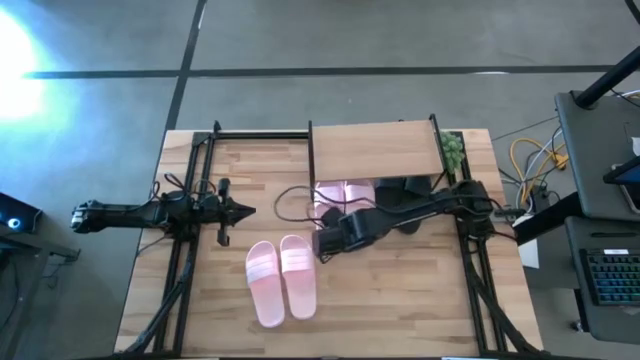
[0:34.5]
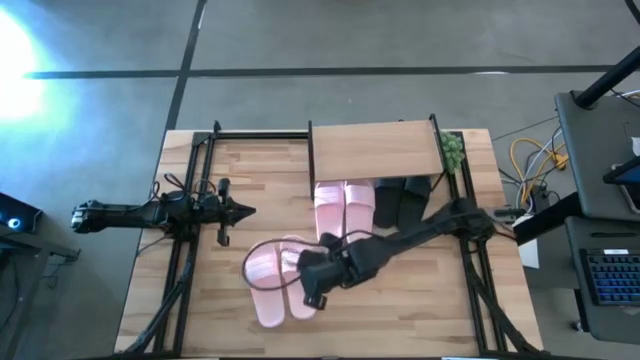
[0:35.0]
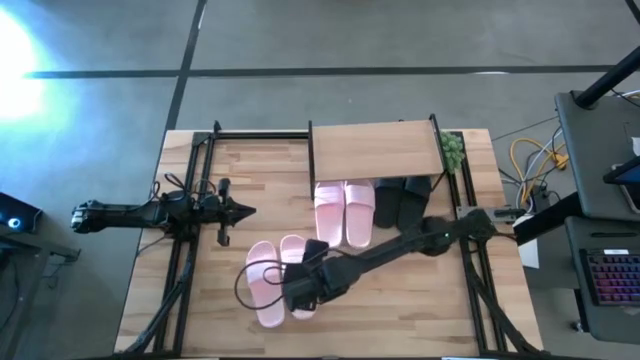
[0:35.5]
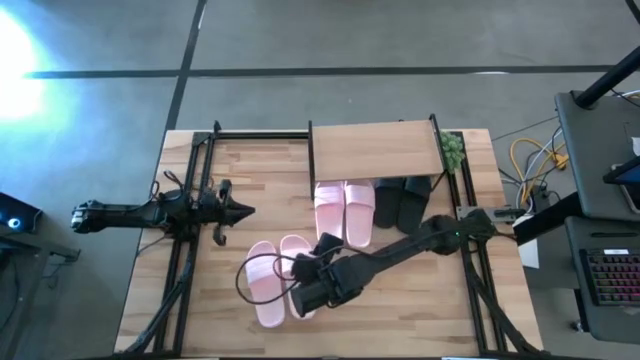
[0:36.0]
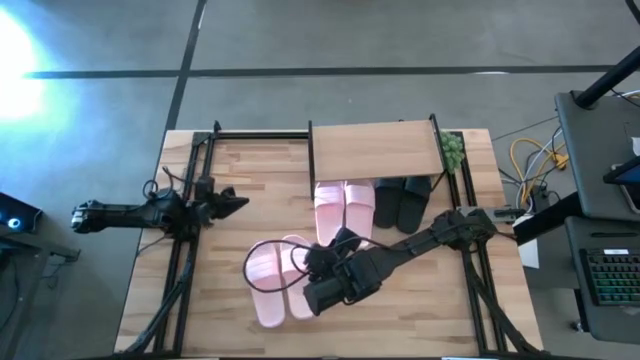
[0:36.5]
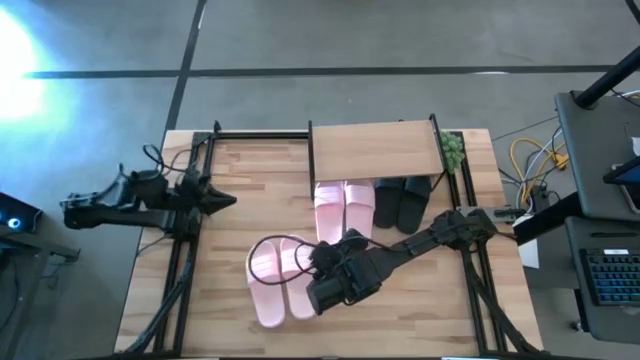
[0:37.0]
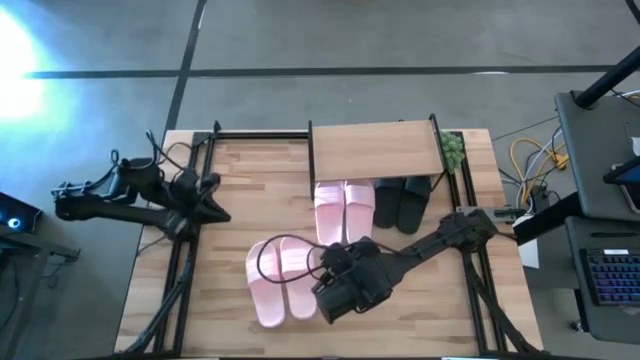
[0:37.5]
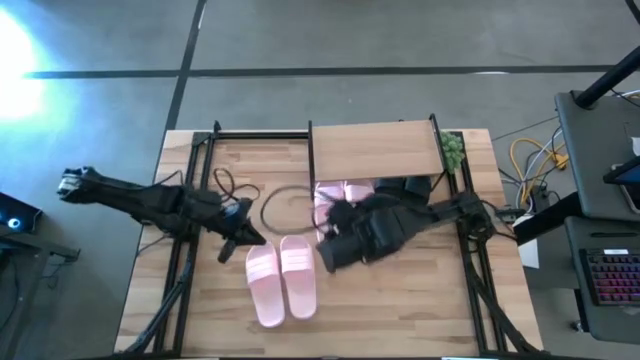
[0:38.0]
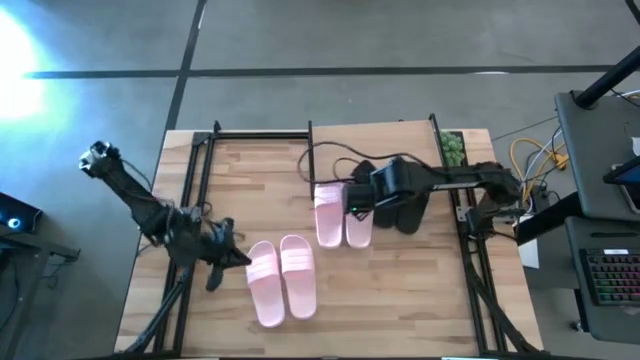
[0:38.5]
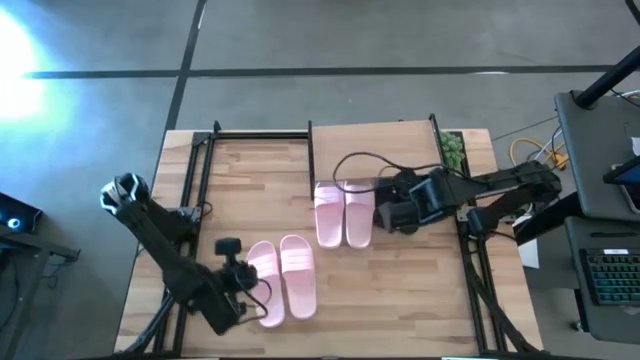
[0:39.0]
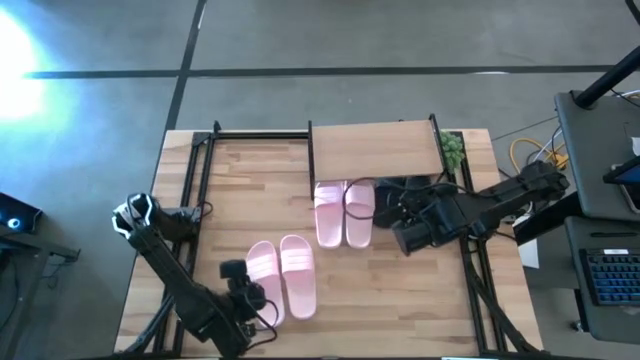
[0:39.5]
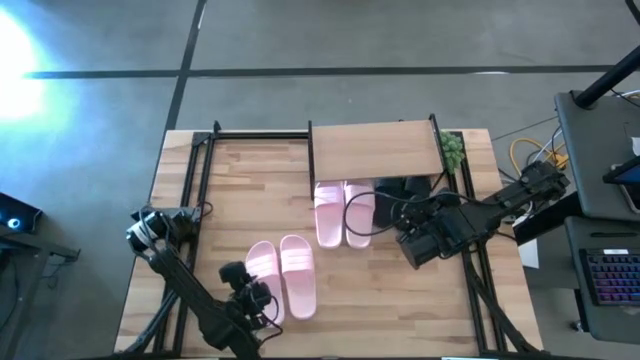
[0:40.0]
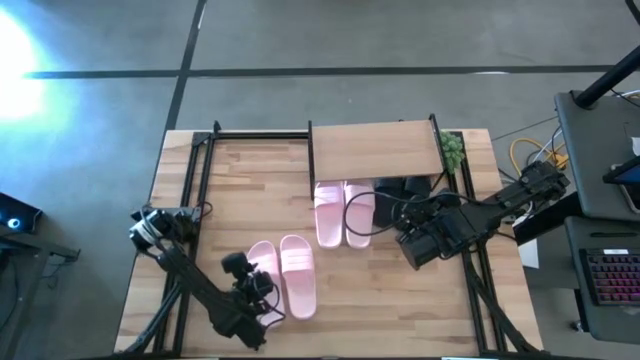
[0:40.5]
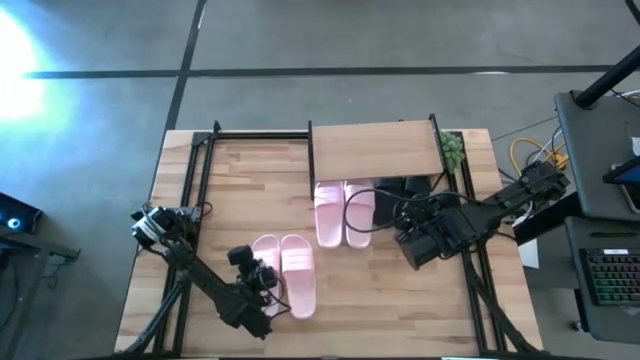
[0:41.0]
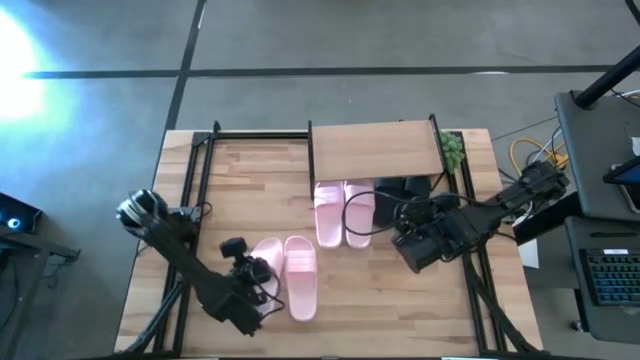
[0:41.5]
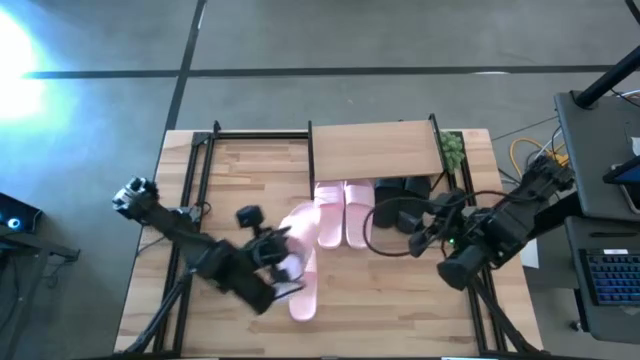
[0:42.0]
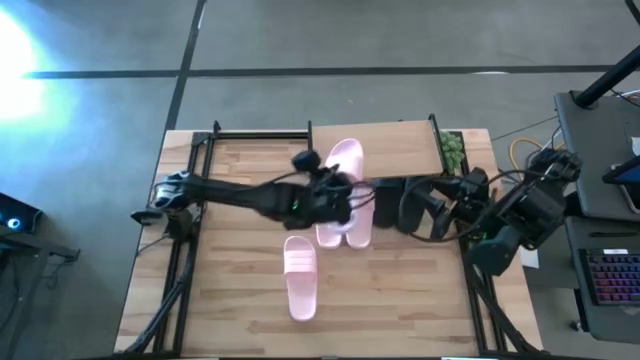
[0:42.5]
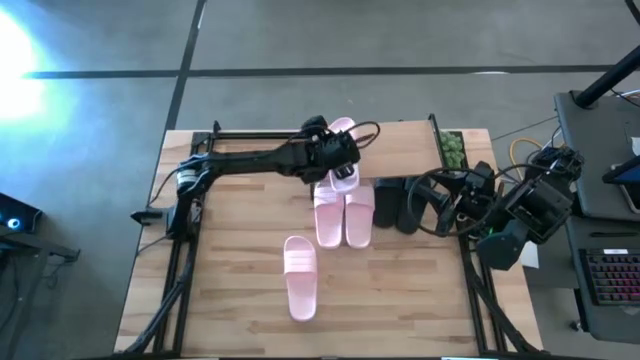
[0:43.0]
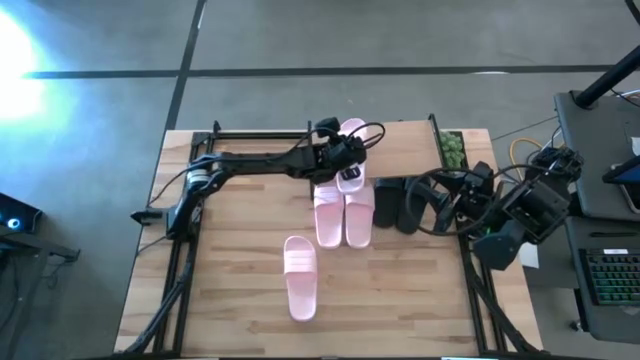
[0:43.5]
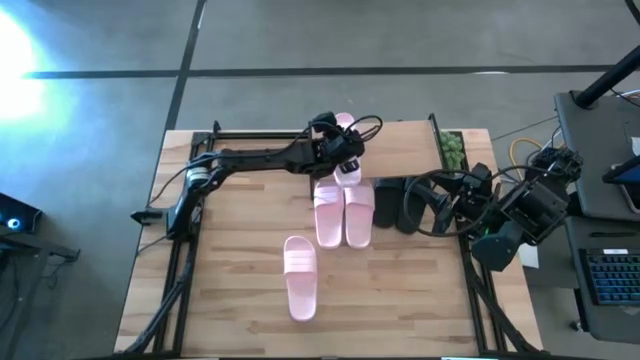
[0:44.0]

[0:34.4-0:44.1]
Task: Pick and place slides into the shelf
Put the pink slipper on the shelf

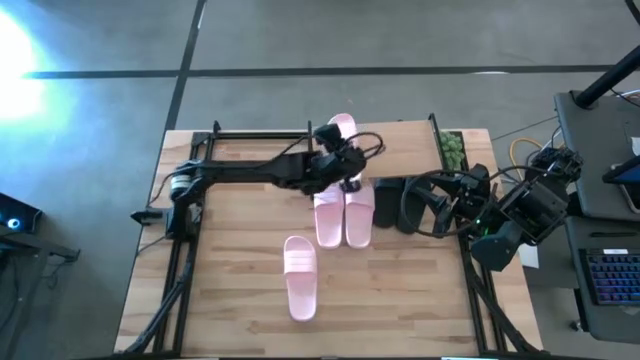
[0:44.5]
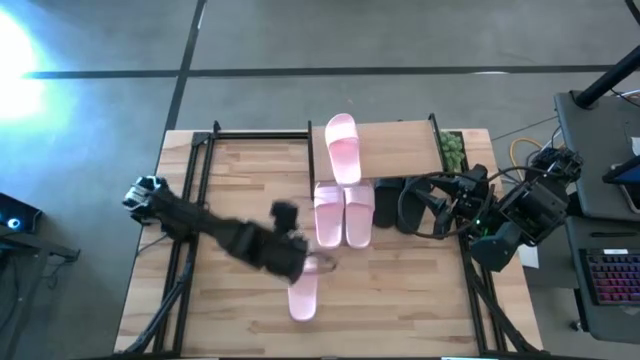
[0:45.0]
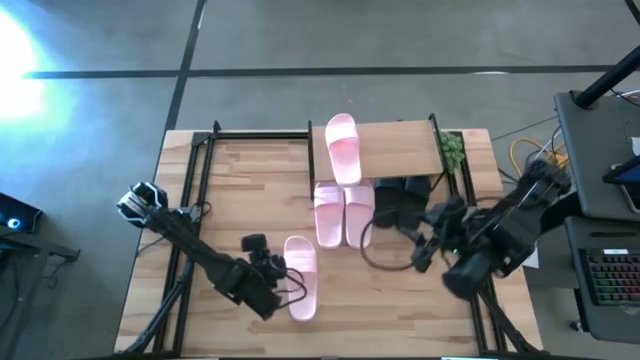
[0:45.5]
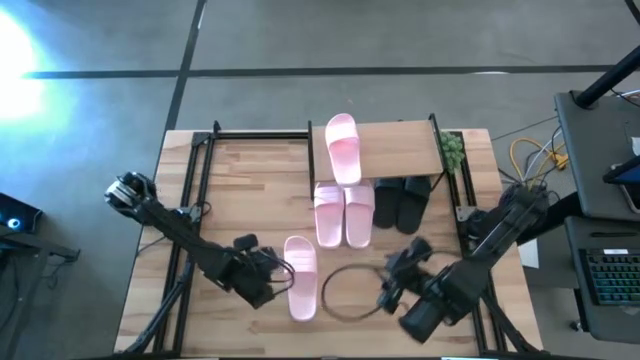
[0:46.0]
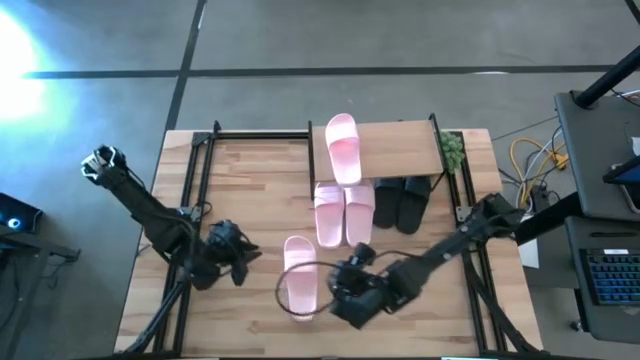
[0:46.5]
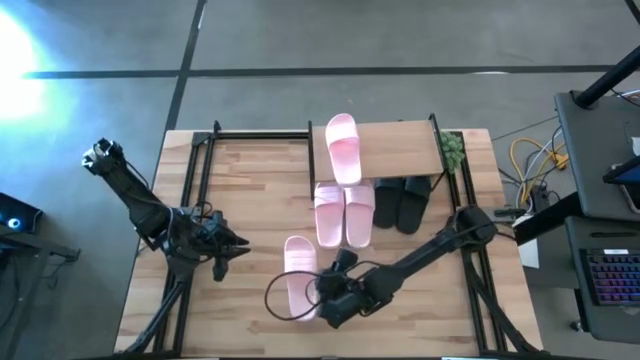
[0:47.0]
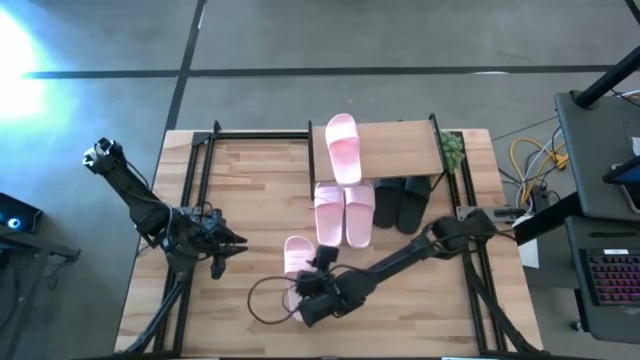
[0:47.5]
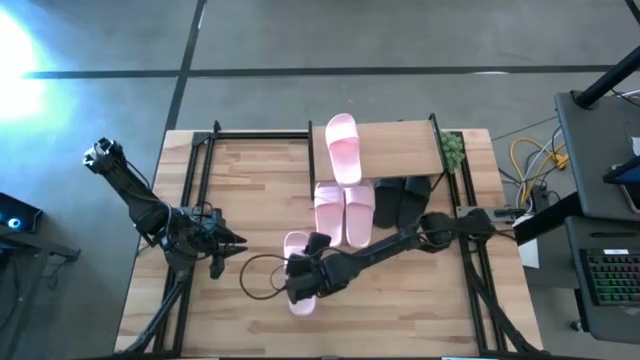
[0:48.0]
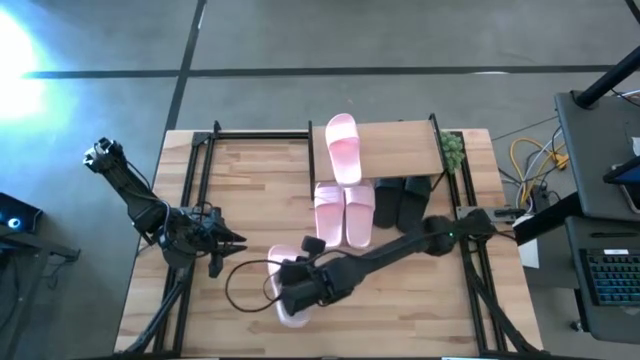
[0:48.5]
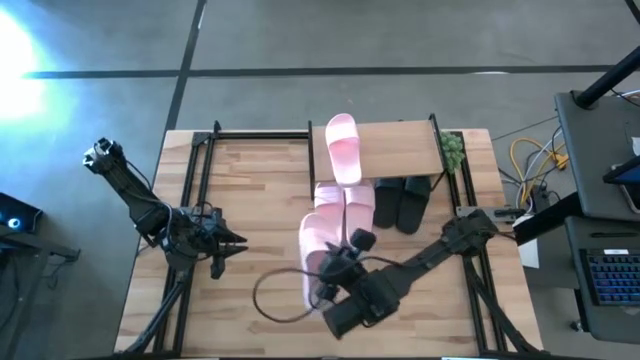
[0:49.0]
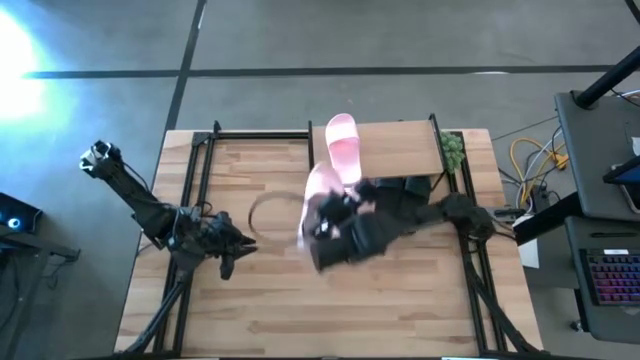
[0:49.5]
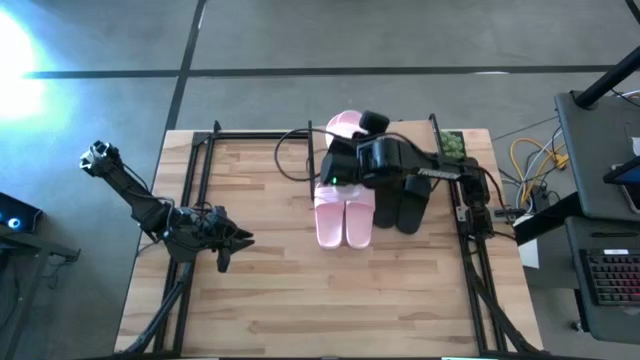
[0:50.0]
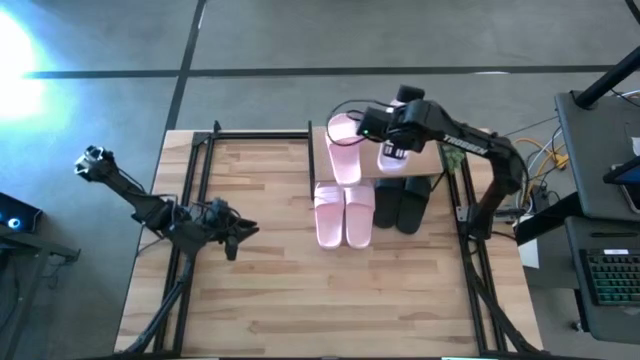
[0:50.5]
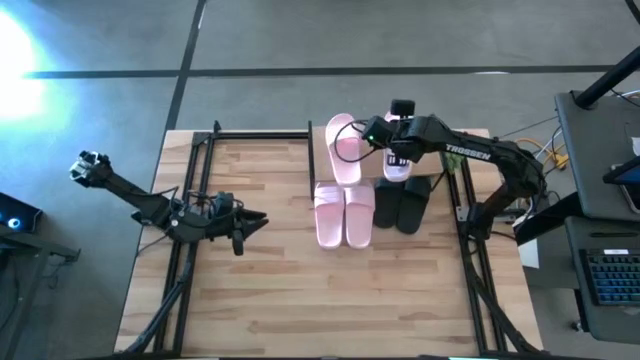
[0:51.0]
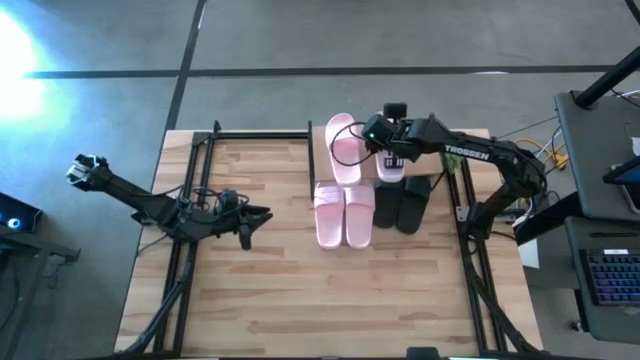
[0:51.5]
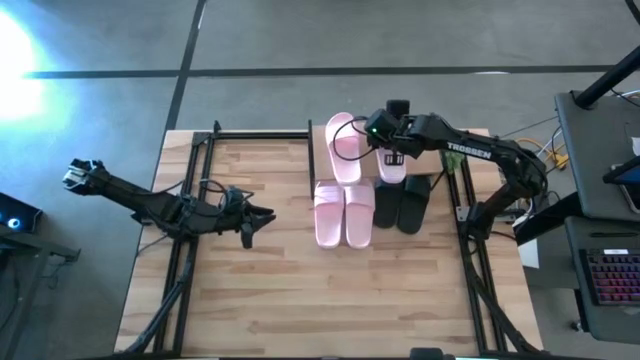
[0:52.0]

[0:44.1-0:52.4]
Put the pink slipper on the shelf

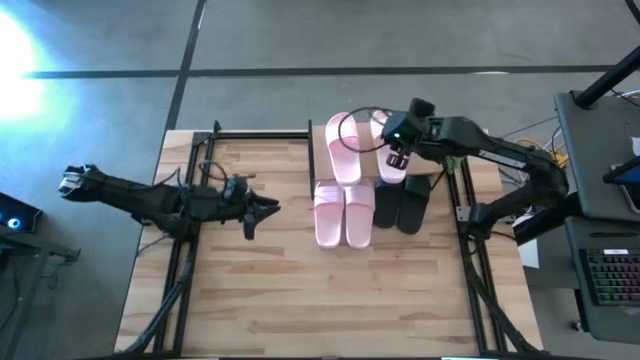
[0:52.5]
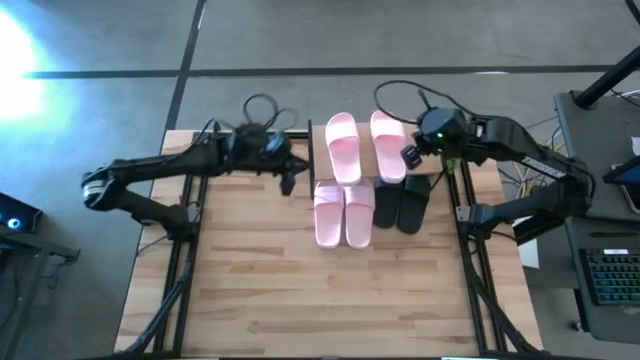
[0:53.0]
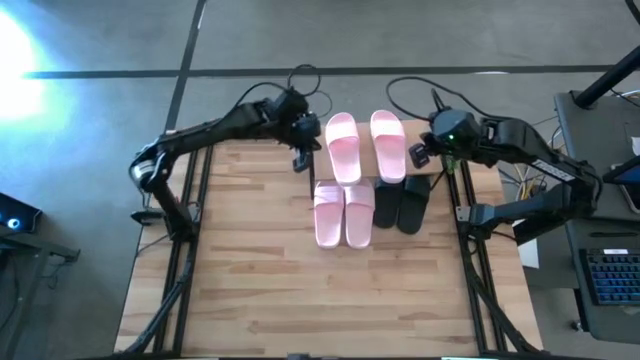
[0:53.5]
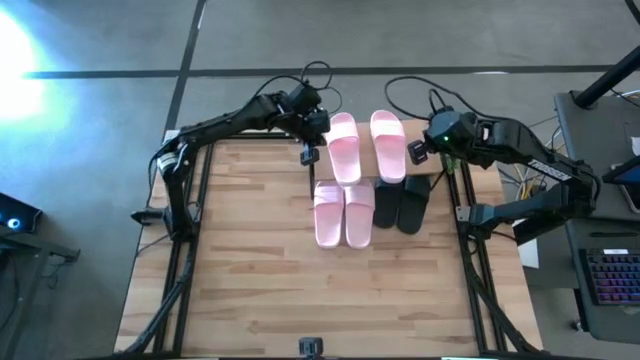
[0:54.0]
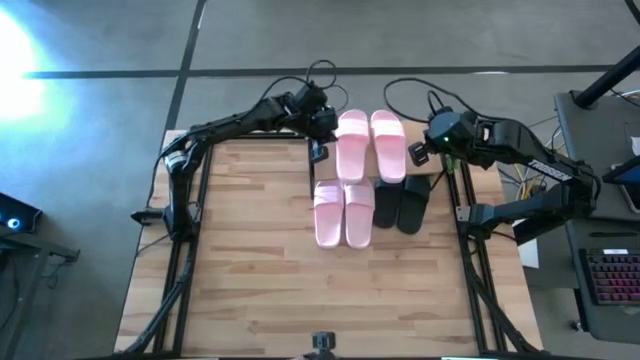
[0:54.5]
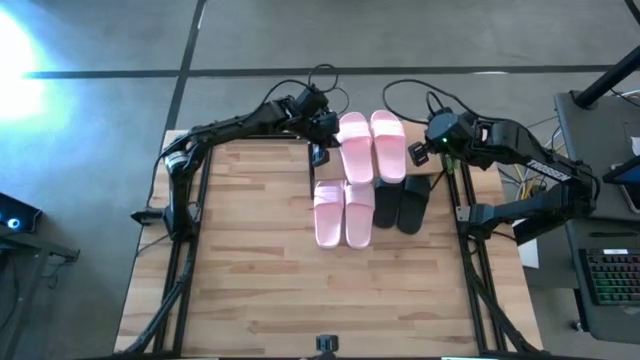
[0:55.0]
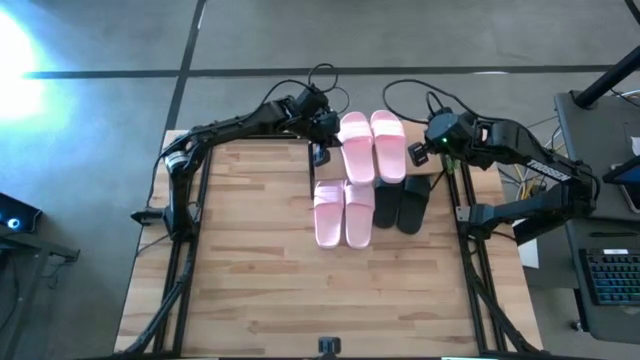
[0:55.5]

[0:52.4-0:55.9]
Adjust the pink slide on the shelf
